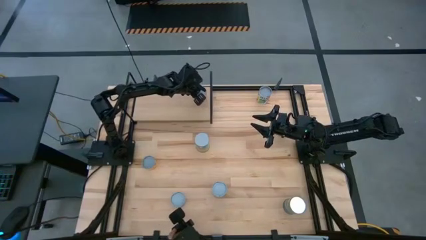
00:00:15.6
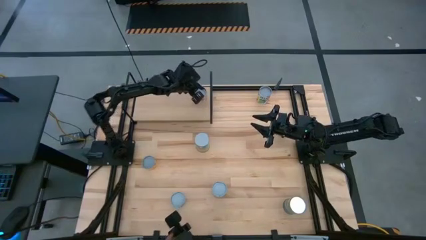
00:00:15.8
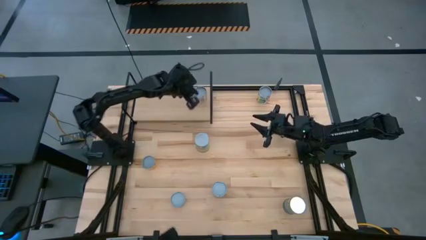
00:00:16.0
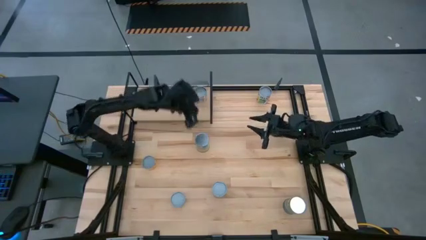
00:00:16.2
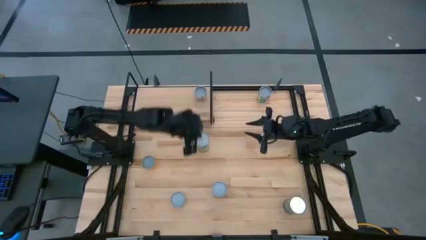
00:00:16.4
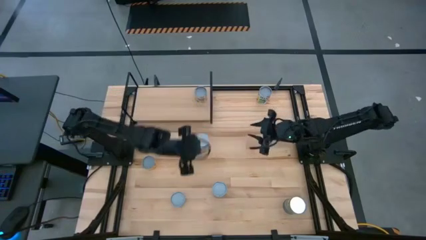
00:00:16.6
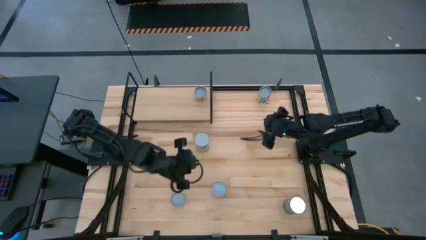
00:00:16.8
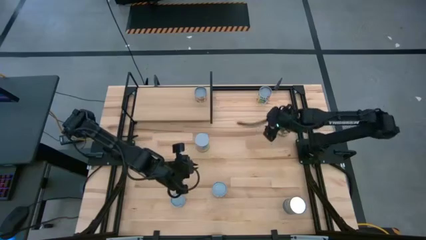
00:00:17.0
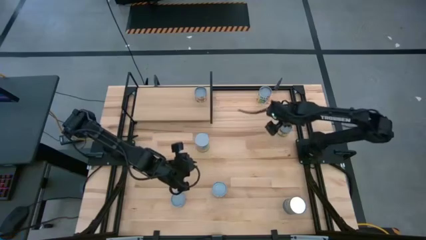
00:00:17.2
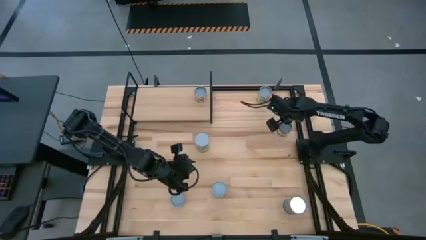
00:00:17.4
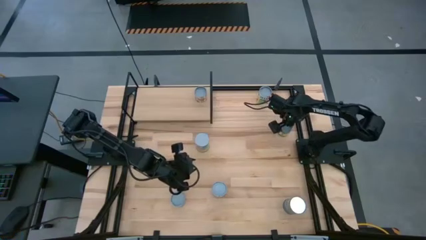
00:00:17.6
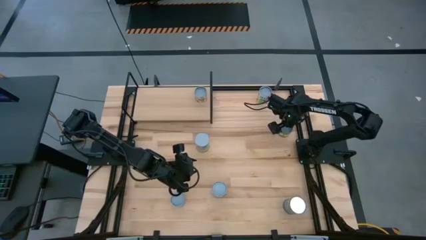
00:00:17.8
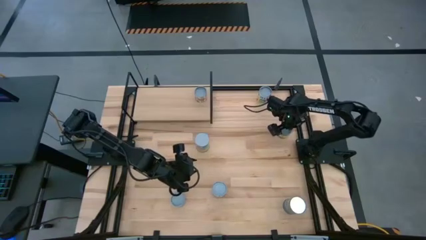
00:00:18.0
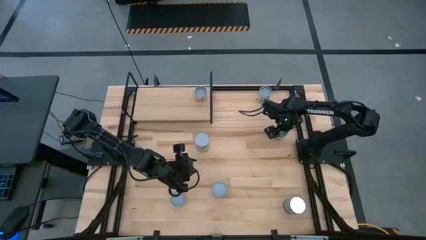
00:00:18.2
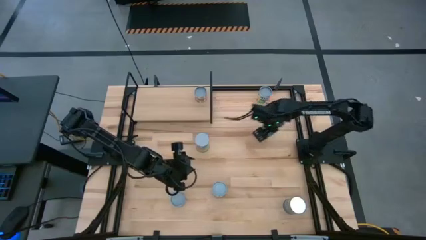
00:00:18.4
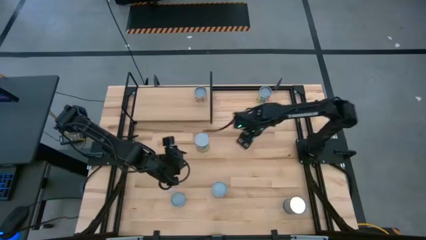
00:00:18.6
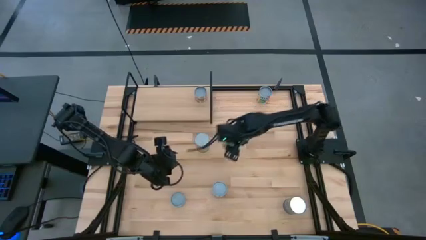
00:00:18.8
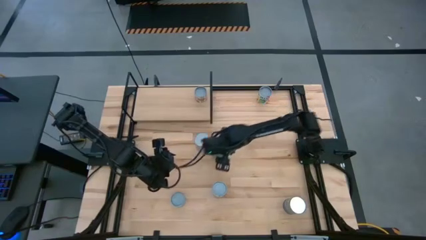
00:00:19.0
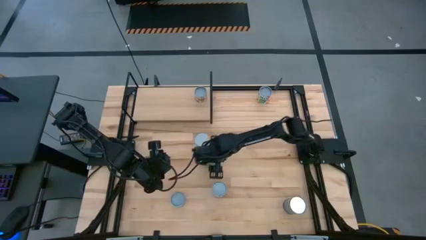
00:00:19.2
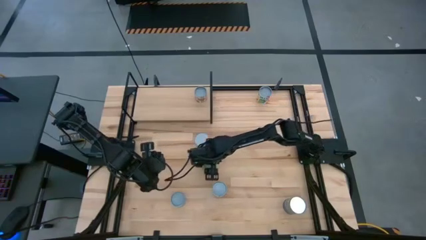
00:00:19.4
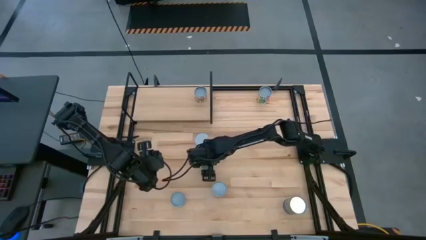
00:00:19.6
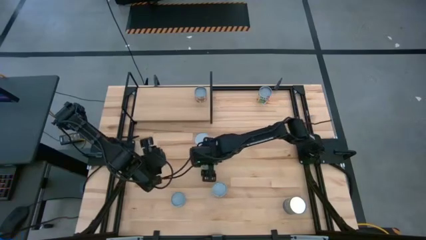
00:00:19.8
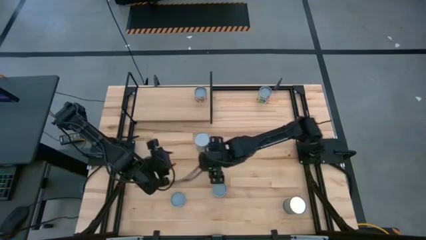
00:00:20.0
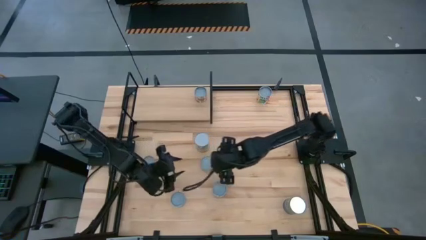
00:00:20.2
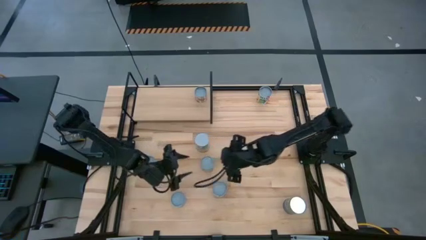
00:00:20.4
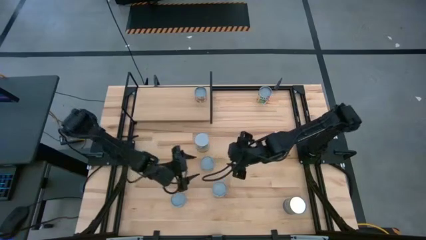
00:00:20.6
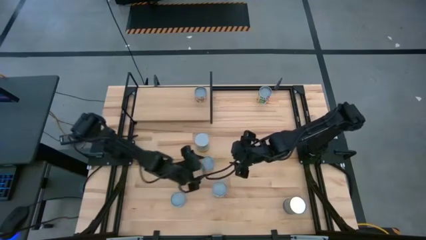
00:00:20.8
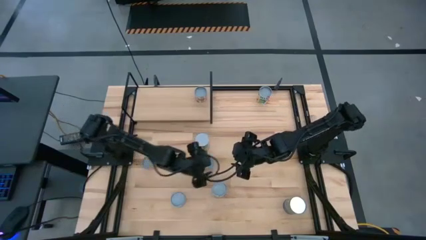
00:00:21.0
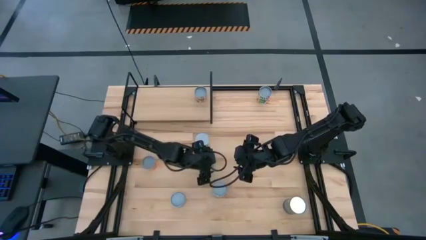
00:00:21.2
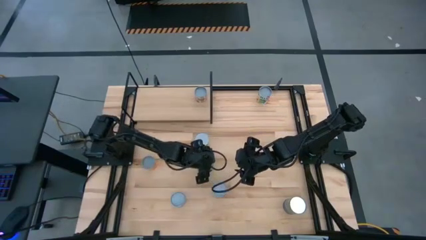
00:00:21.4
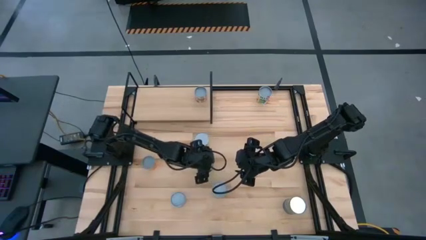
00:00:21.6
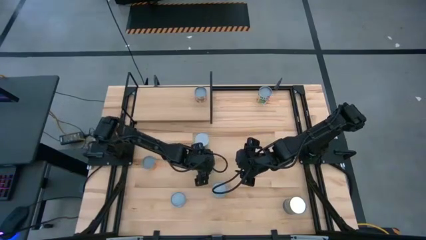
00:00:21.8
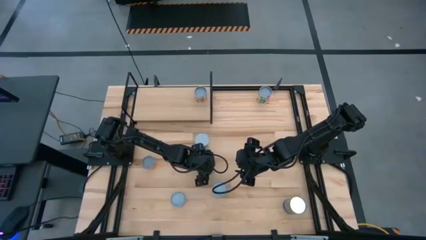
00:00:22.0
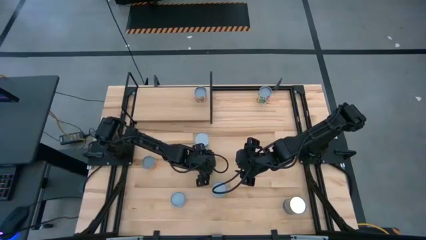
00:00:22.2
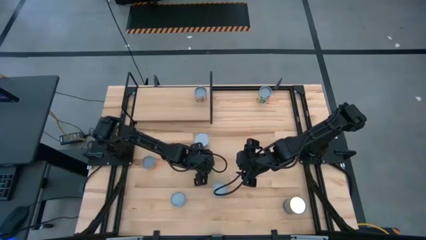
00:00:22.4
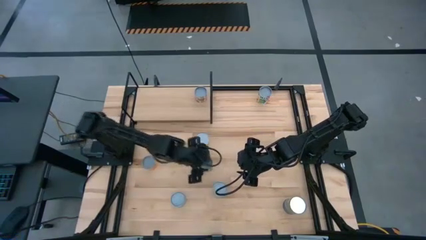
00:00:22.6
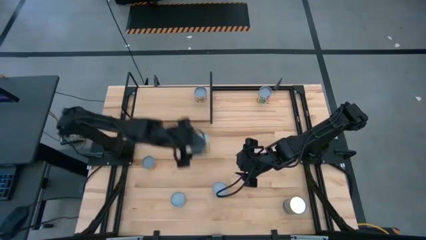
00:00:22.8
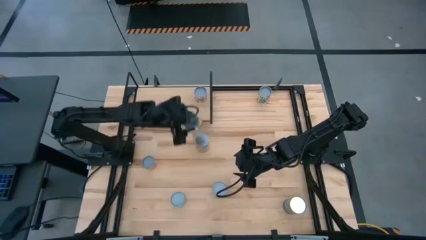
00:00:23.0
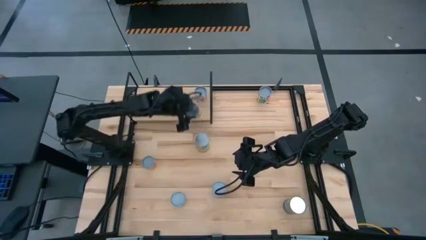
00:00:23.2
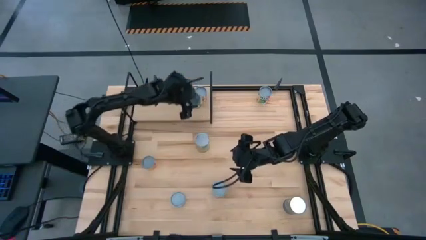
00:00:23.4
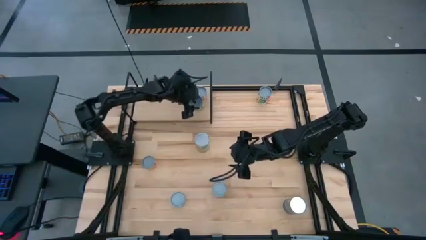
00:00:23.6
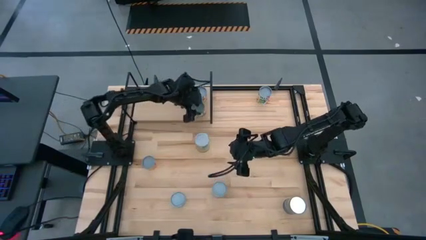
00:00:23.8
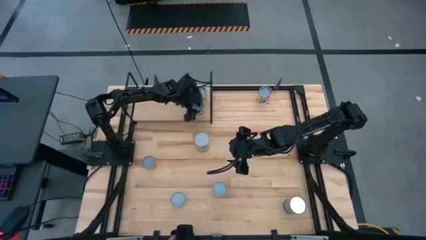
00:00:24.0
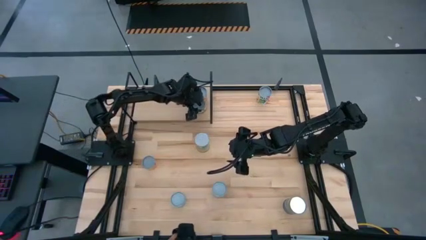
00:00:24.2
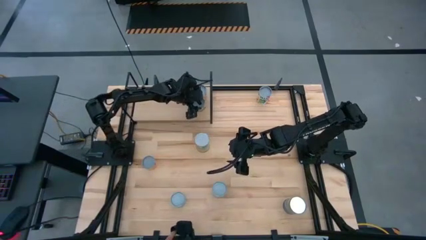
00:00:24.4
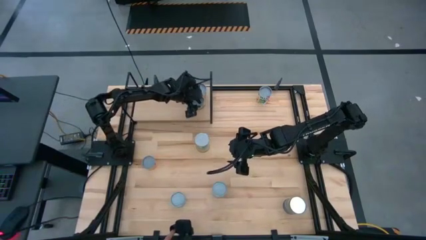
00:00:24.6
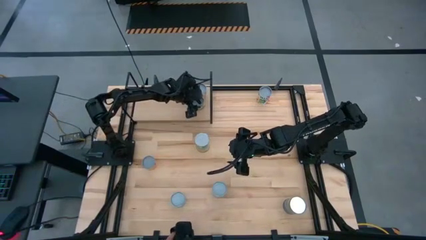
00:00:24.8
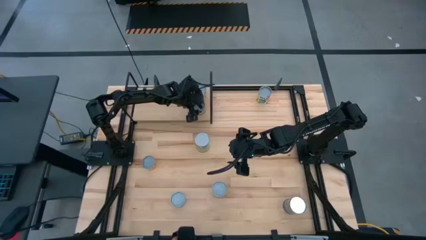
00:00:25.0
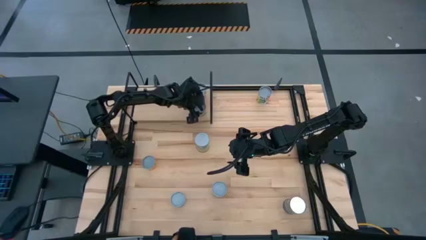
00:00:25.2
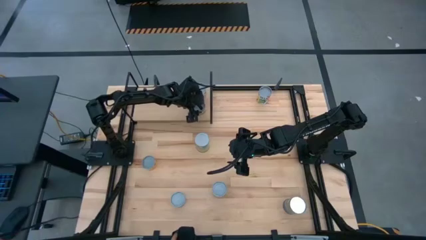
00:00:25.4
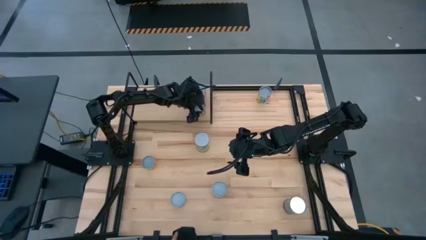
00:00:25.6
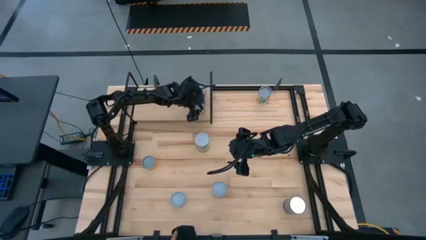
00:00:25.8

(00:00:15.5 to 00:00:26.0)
Task: Pick and place cans onto a shelf
Put the canned sliced peaches on the shelf

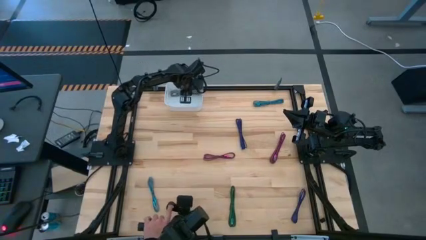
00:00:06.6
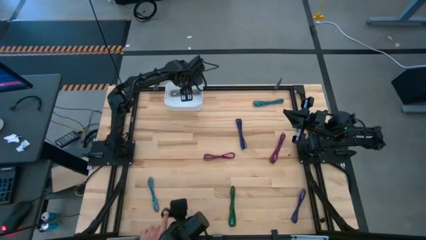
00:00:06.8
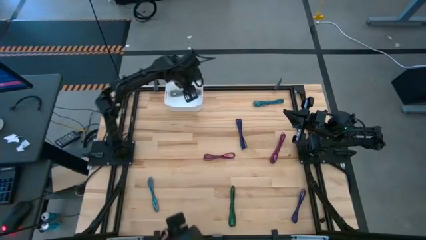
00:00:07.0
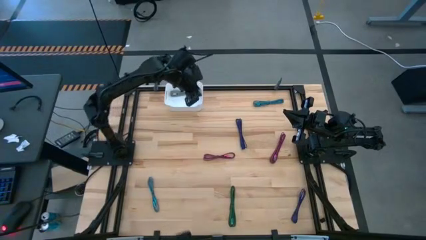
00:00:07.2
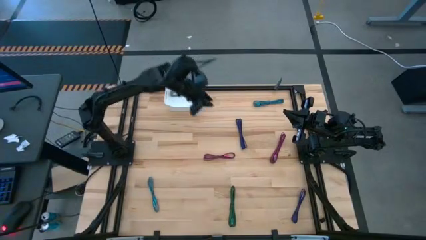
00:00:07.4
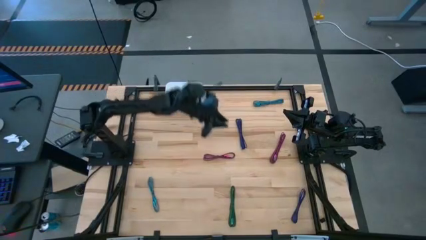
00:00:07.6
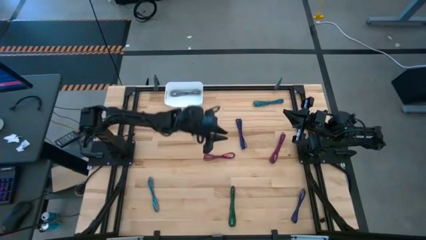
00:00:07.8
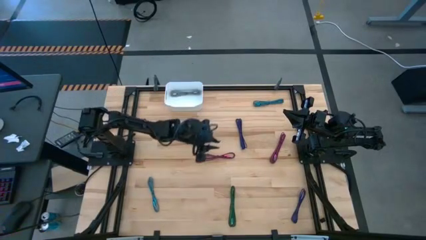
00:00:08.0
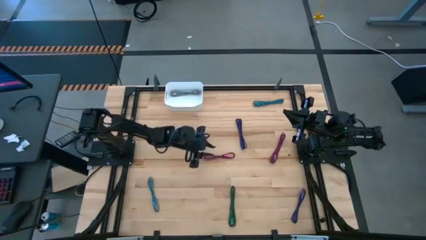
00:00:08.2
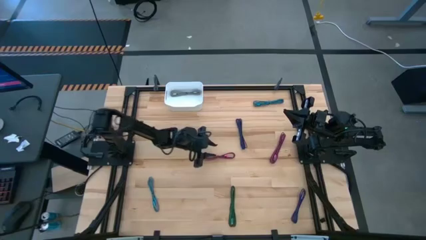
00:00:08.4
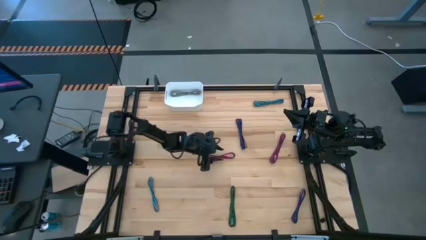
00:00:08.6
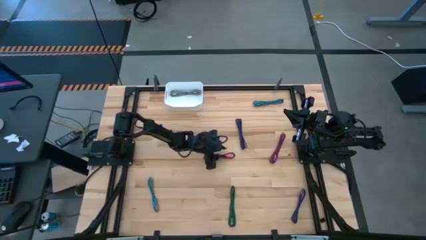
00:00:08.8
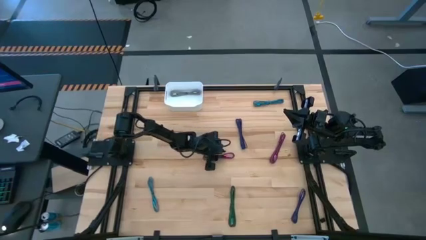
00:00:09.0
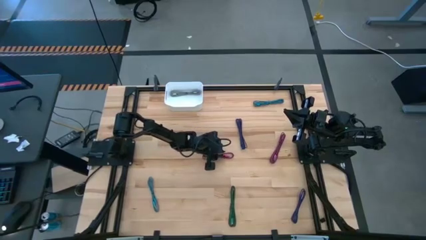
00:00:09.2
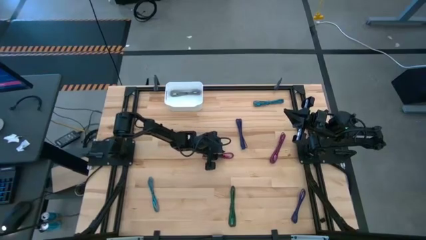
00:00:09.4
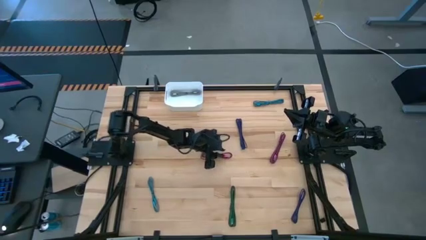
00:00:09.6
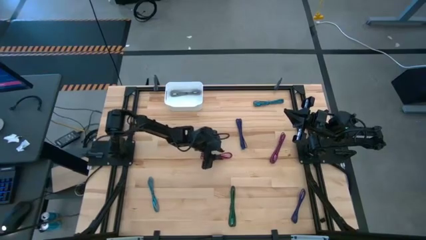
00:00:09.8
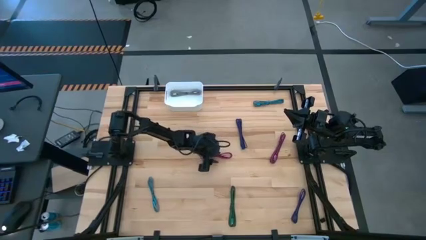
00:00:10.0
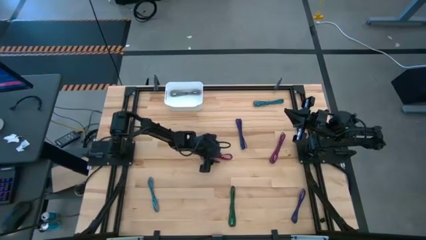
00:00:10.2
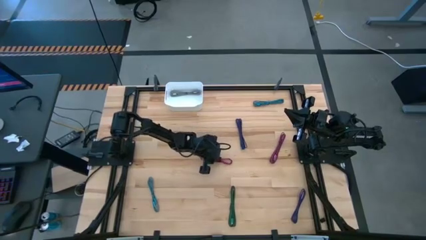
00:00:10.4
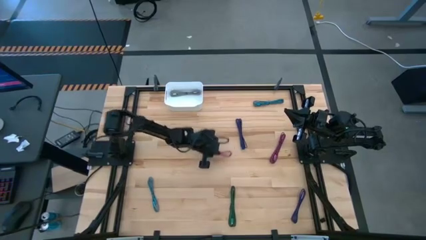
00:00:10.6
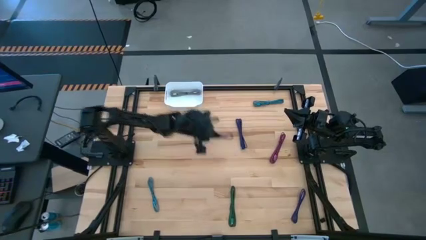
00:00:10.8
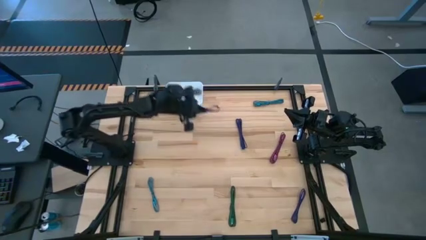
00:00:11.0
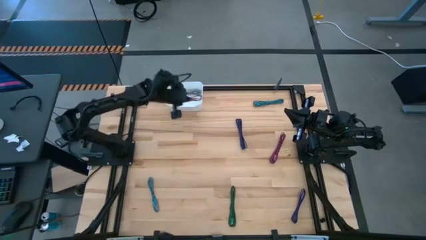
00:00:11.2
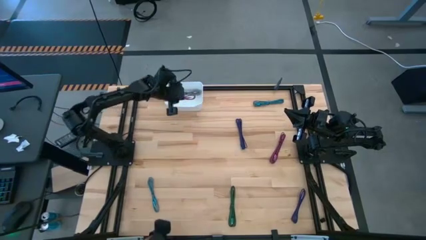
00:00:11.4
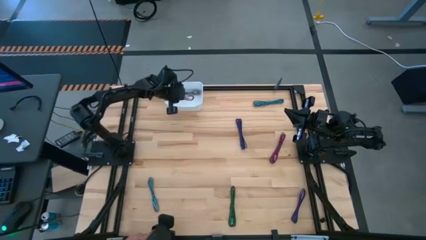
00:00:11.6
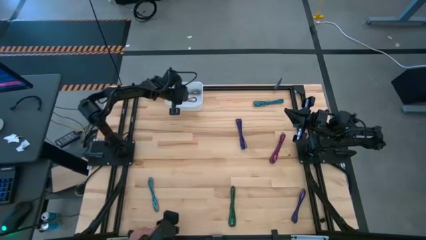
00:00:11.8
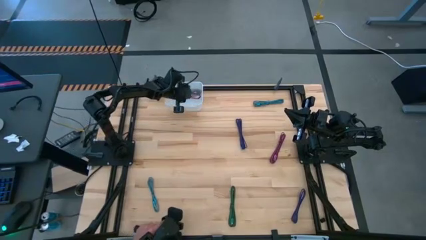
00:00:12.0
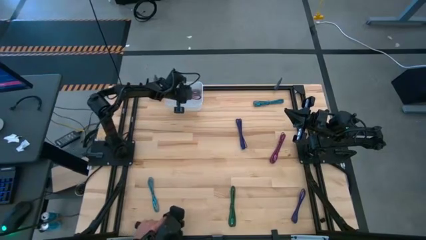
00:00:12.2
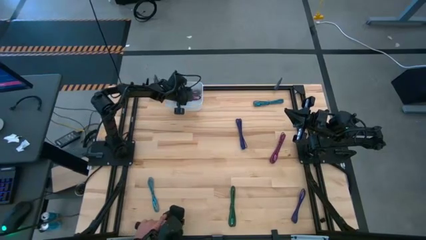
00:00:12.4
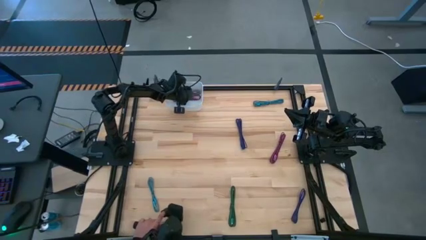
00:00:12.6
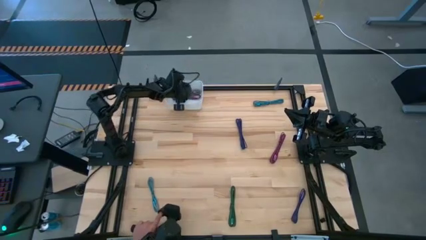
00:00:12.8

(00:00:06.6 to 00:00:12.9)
Task: Pick and place USB-C Cables
Put the left pink charger cable into the white bin
